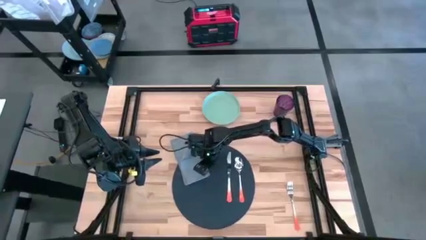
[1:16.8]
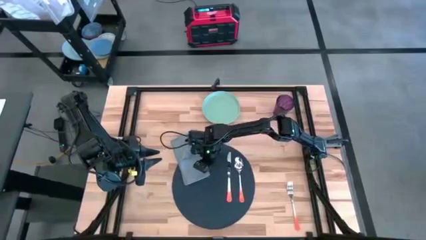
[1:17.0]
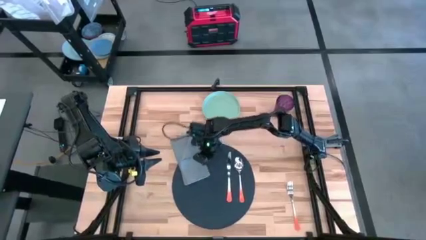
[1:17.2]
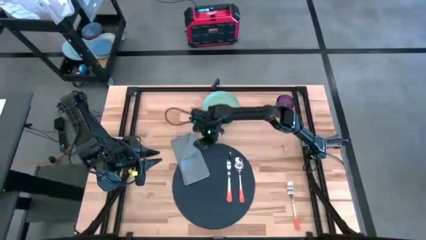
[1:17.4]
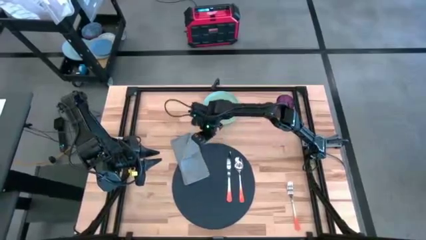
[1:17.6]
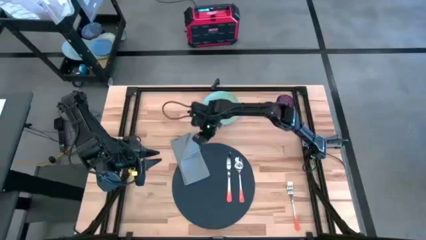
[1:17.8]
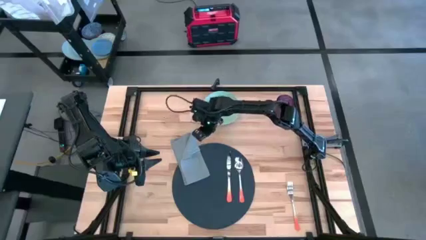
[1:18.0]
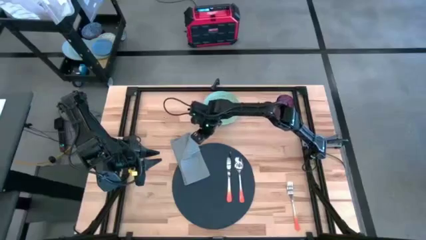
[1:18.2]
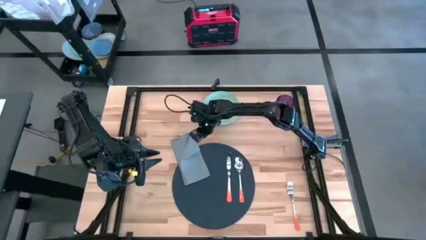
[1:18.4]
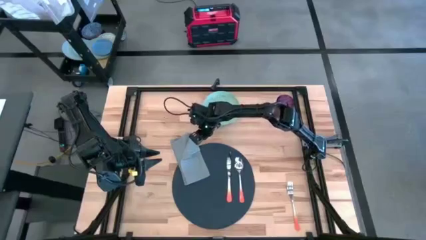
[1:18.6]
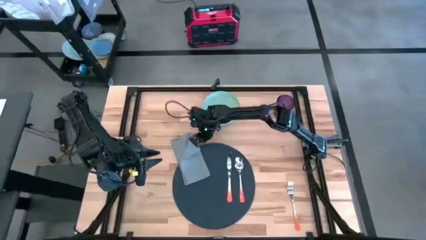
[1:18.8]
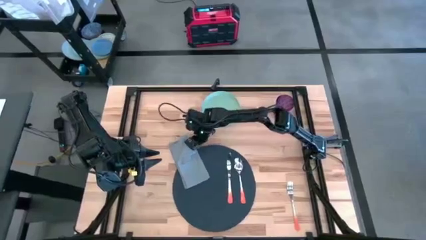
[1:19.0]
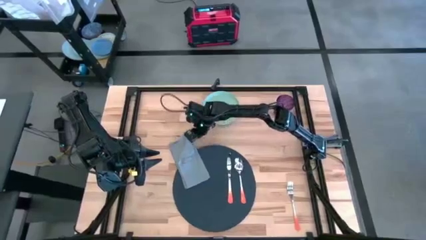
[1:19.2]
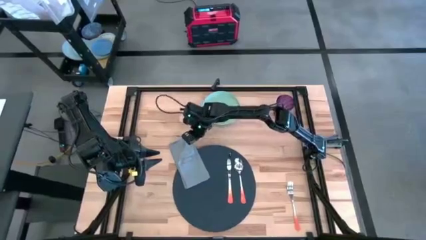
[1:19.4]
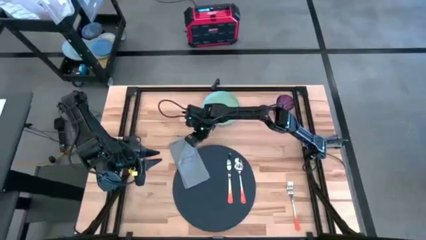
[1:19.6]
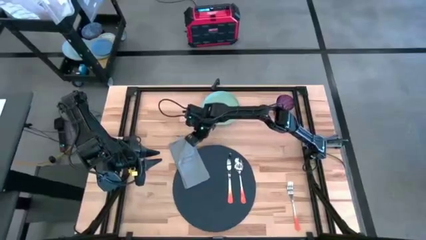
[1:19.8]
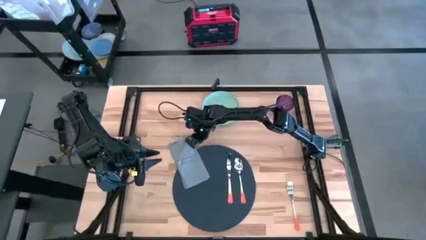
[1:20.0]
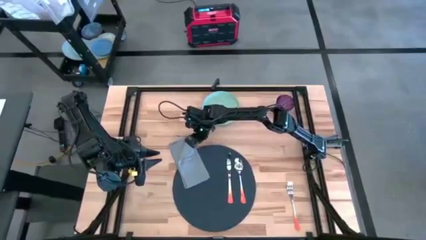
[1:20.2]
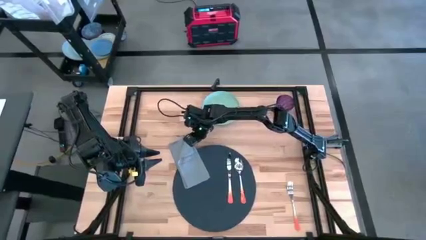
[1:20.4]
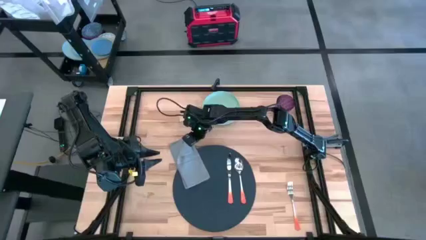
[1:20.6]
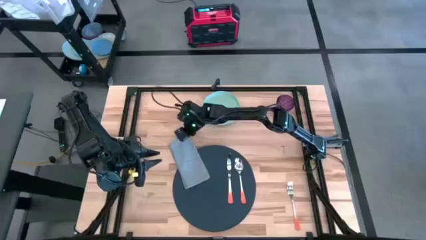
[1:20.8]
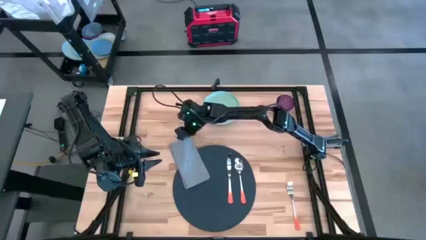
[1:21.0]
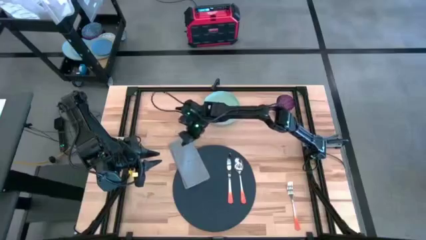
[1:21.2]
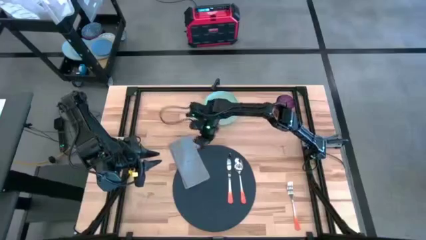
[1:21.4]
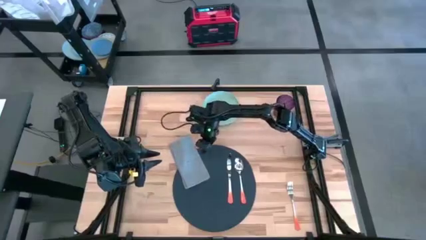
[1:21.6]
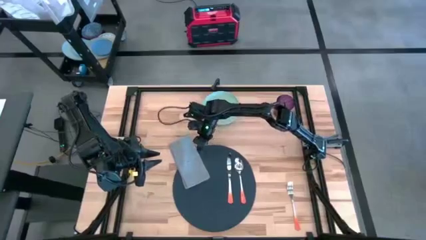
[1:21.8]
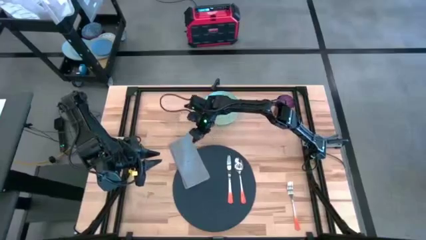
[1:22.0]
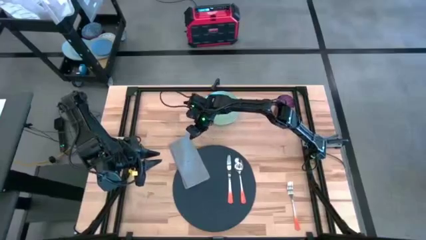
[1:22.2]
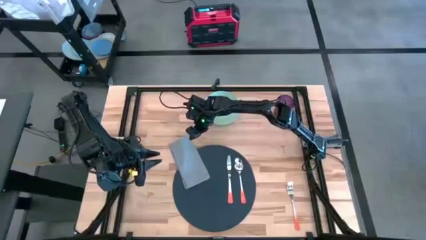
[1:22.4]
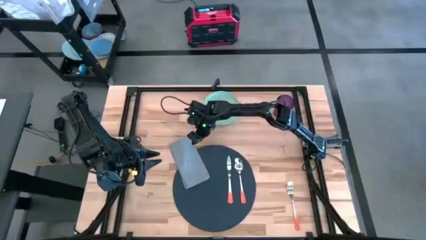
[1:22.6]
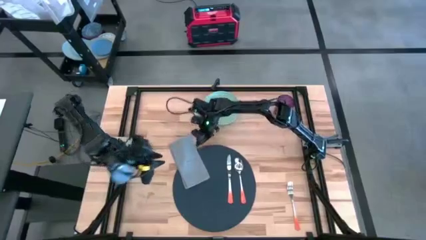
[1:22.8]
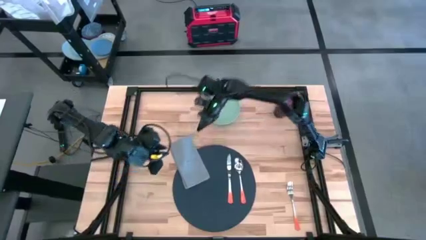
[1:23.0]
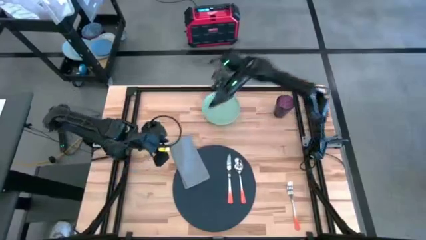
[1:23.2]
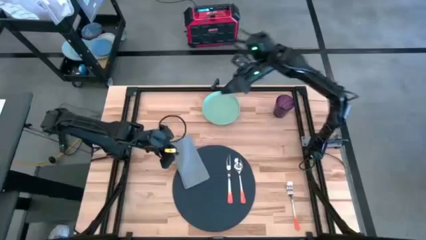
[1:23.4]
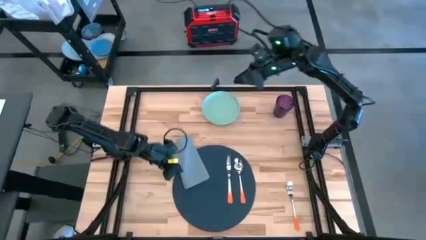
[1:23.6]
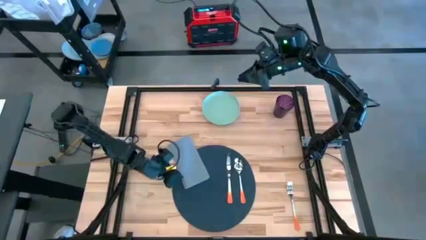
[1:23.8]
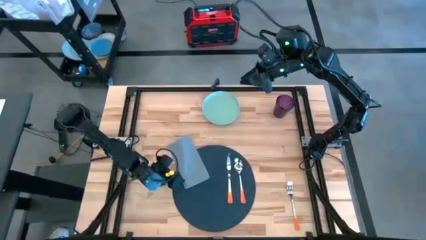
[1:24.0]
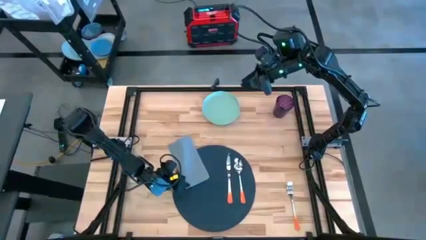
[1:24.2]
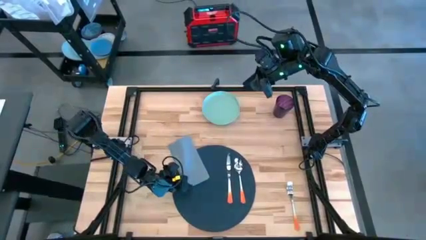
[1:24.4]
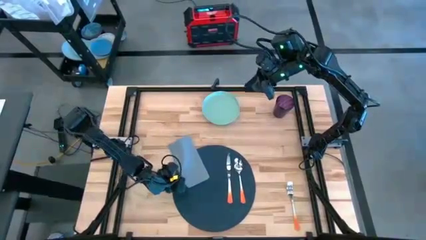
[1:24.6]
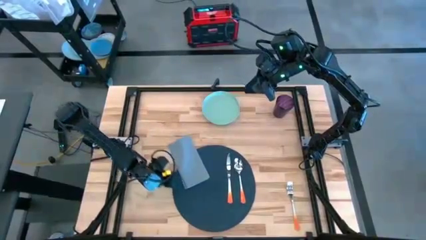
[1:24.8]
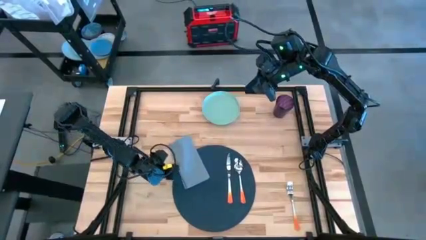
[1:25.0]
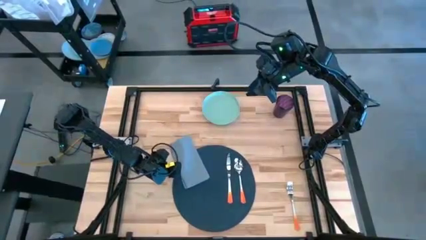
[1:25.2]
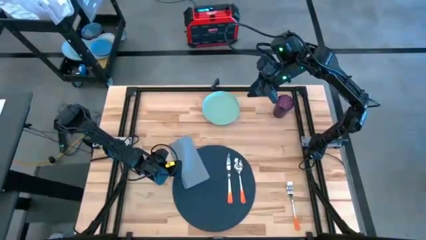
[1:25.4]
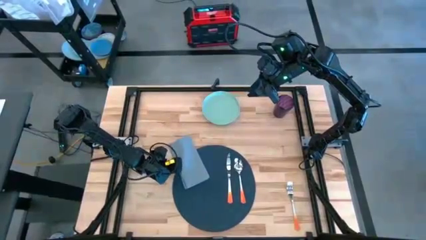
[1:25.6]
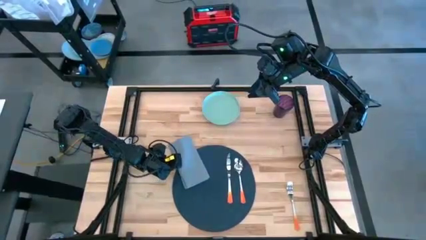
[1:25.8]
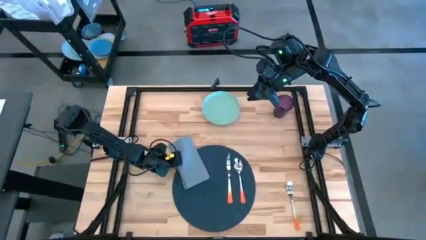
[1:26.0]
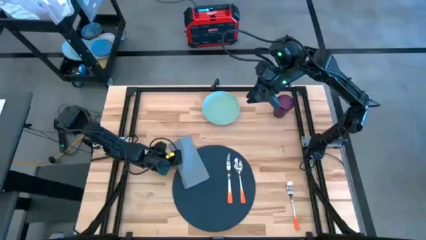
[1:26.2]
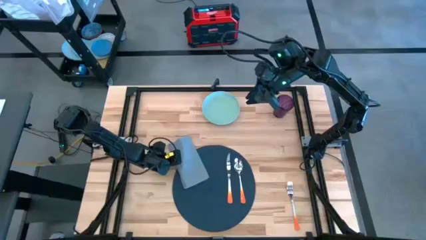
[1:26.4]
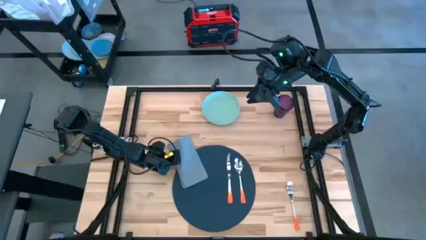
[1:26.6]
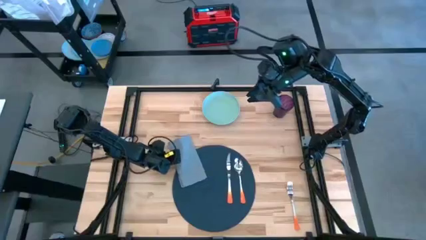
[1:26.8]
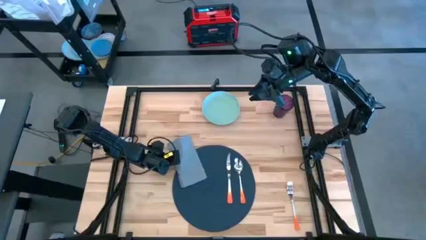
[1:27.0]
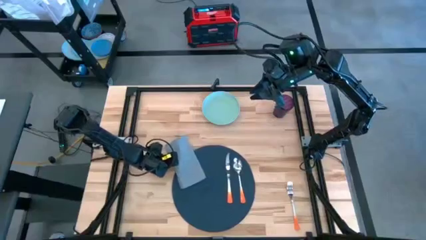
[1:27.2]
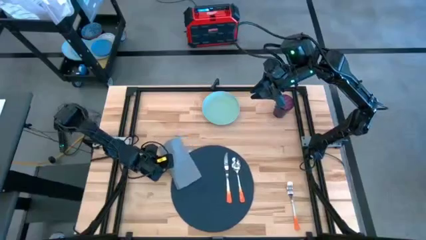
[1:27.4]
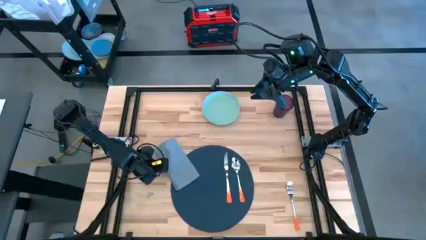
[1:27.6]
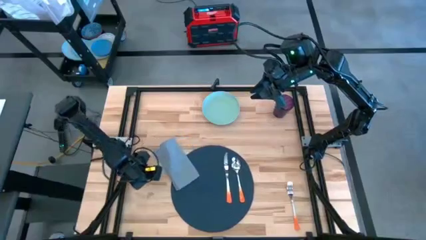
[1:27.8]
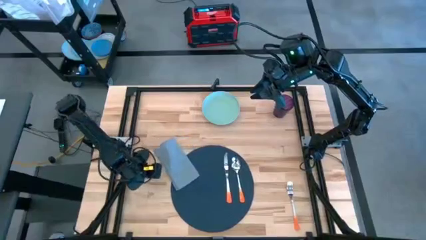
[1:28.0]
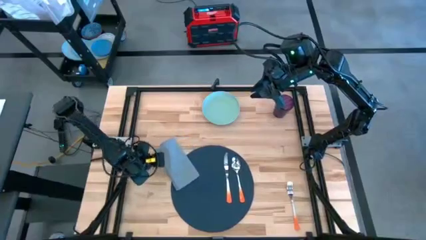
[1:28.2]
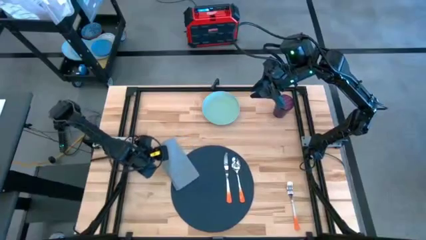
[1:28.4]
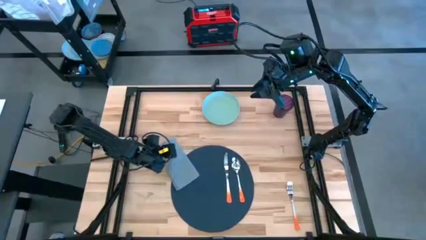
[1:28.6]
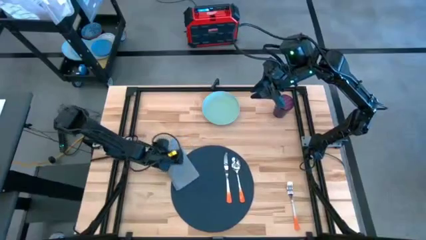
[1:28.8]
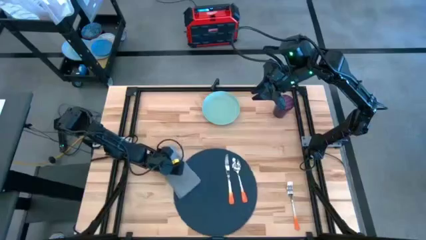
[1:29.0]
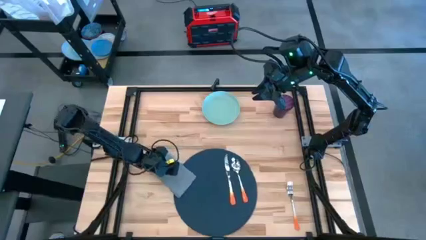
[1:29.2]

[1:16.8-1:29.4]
Task: Set table place
Fold the gray table napkin

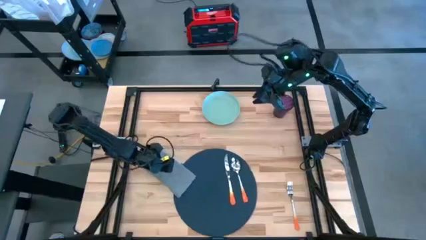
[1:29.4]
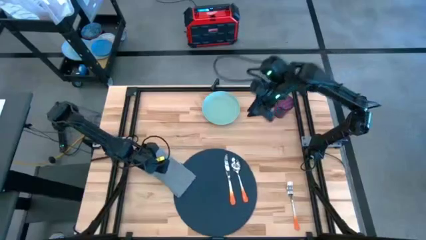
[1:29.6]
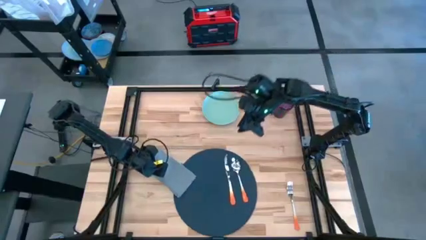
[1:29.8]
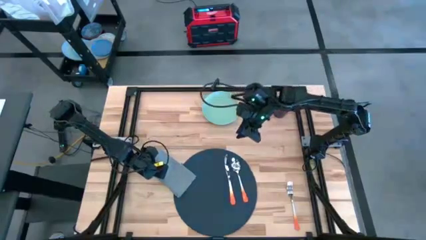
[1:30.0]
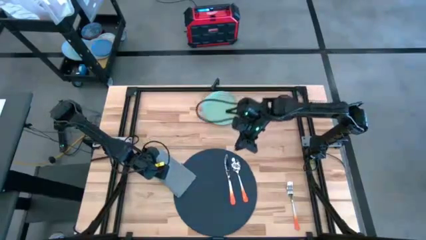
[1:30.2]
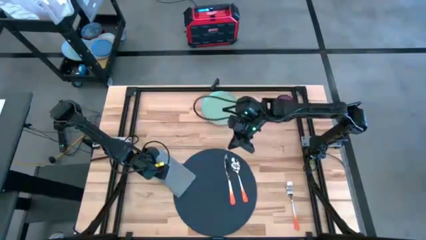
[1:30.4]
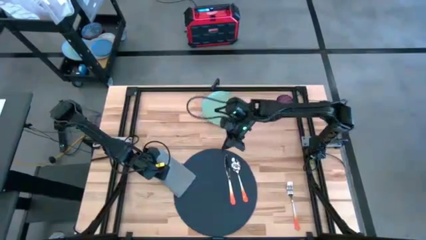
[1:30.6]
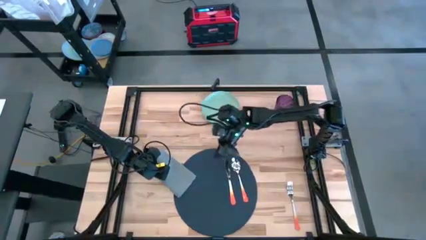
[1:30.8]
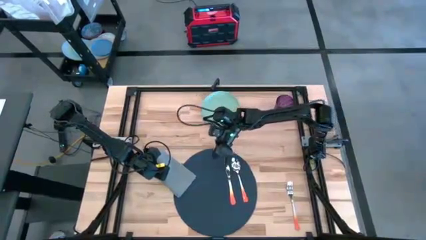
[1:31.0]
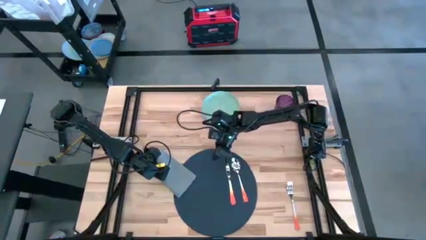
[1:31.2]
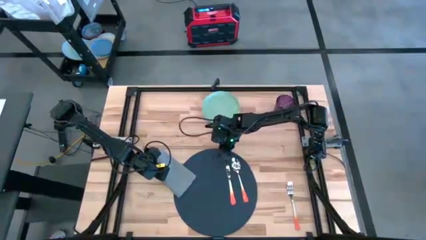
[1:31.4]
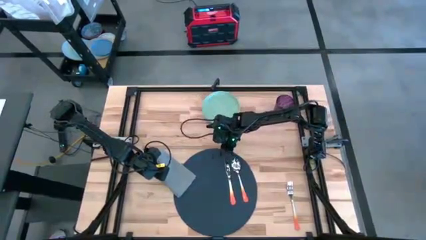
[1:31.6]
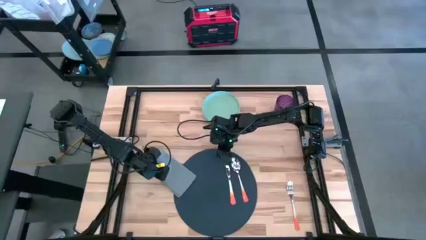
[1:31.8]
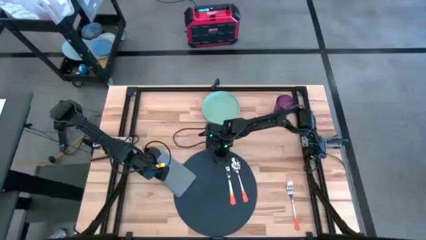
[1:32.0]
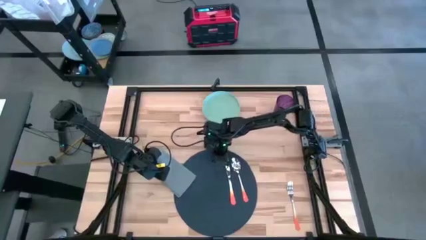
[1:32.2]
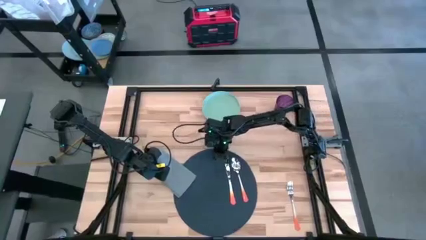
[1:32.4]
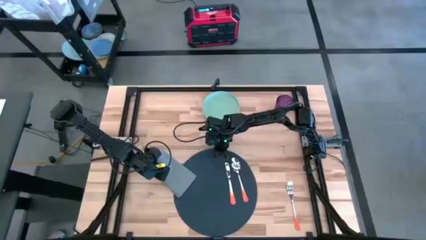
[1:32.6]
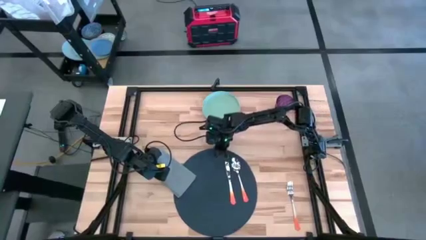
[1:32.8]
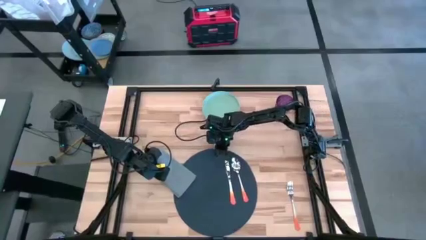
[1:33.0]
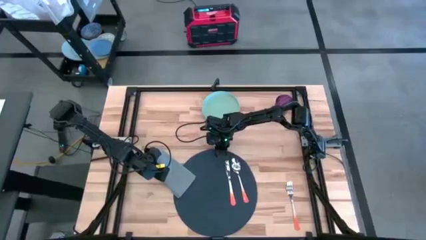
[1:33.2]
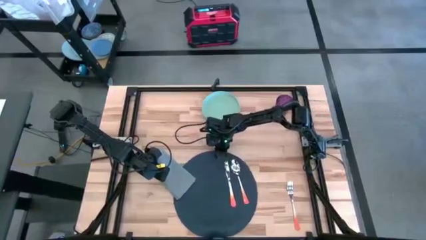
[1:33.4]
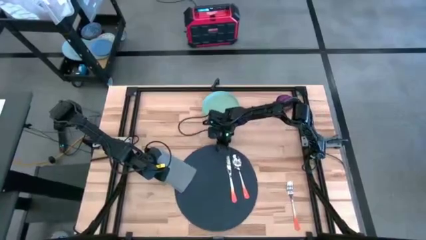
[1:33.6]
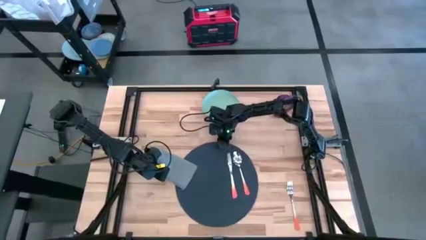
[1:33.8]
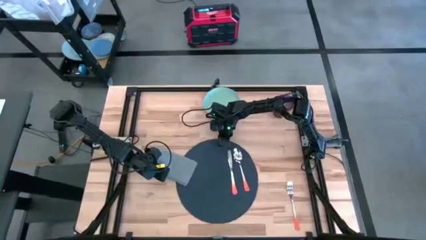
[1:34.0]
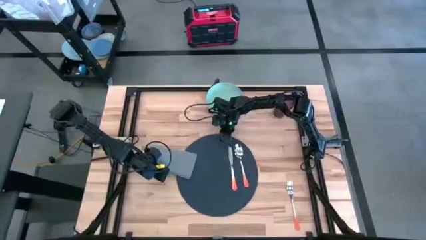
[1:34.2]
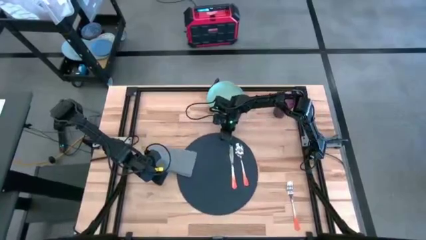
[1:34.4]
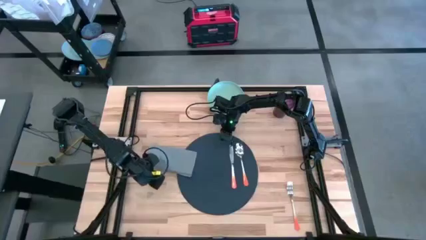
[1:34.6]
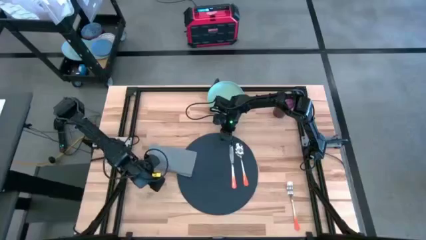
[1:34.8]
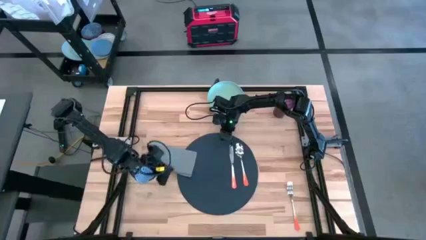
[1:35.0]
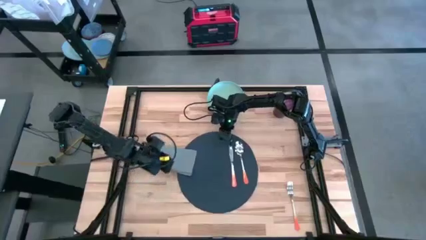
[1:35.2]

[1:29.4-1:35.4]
Adjust the dark gray placemat on the table
